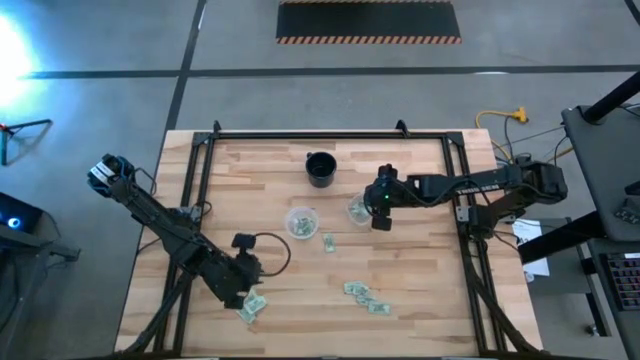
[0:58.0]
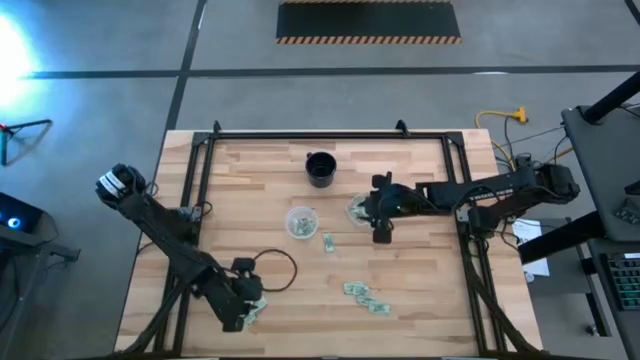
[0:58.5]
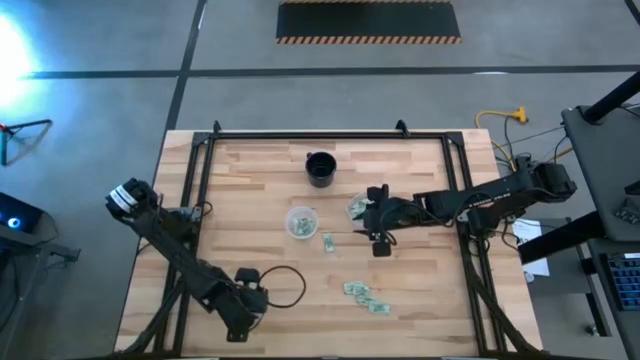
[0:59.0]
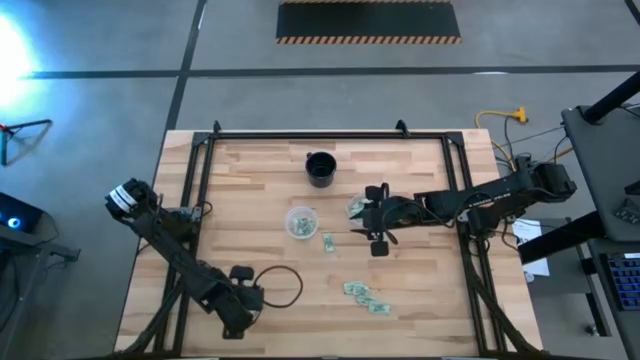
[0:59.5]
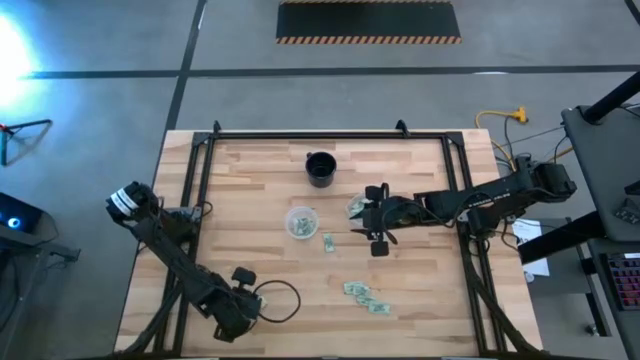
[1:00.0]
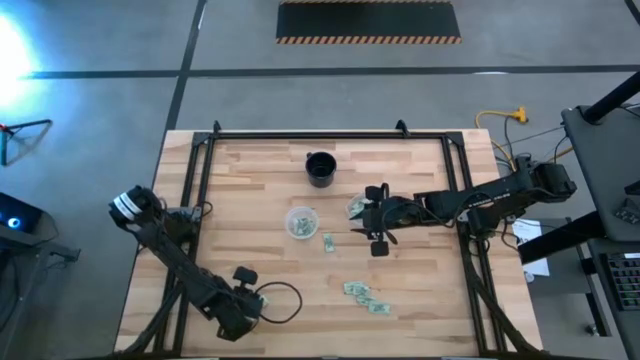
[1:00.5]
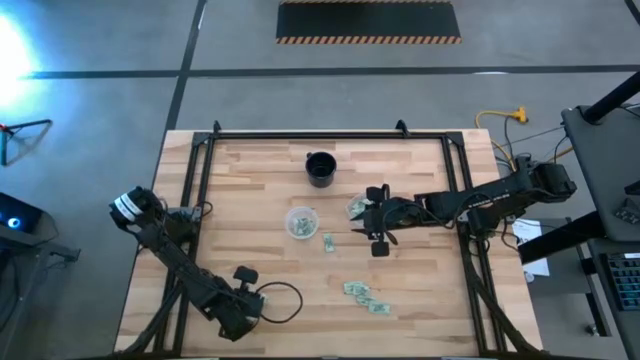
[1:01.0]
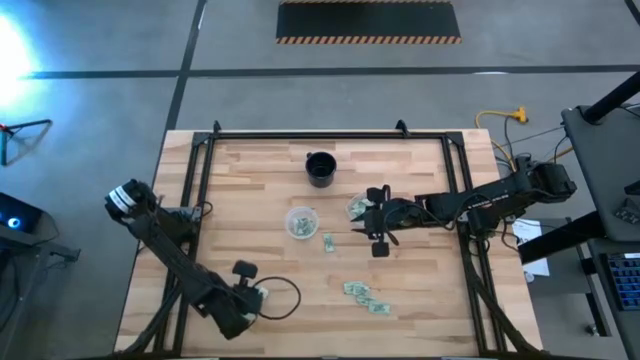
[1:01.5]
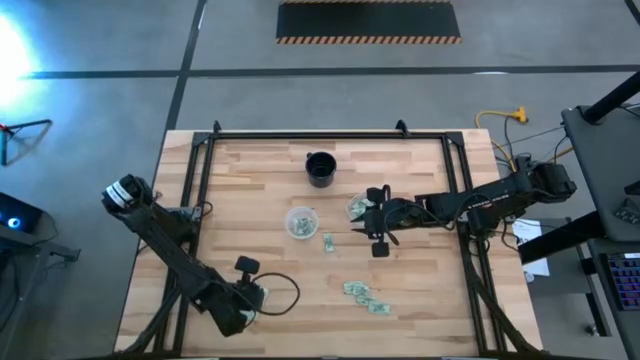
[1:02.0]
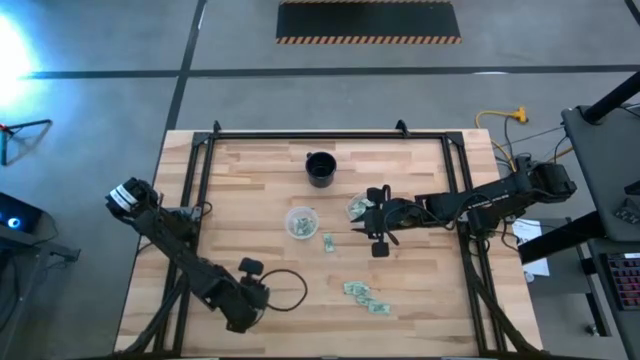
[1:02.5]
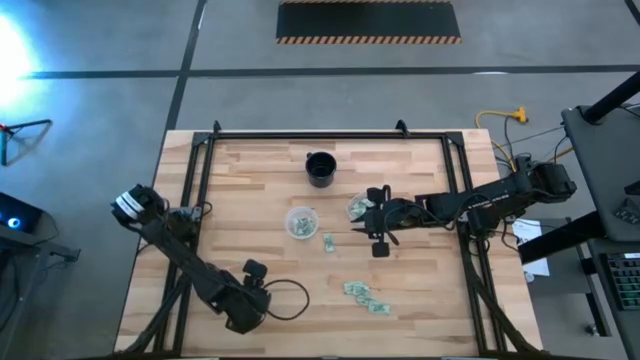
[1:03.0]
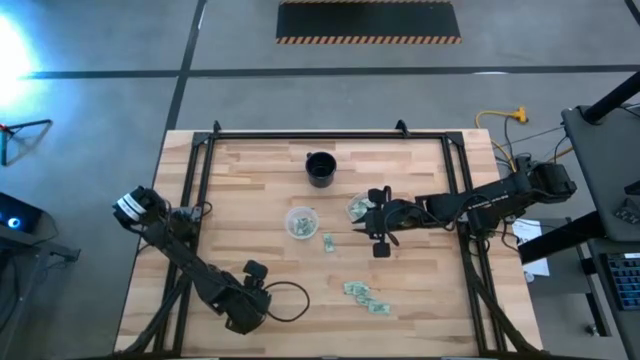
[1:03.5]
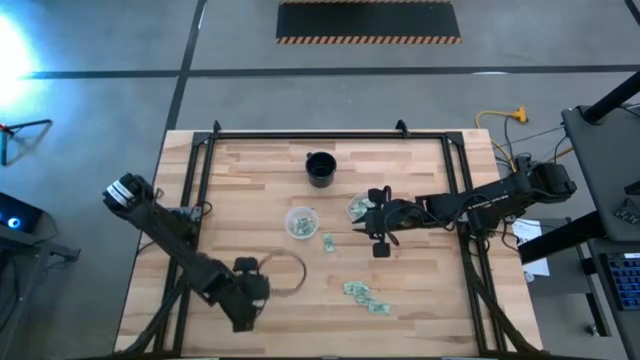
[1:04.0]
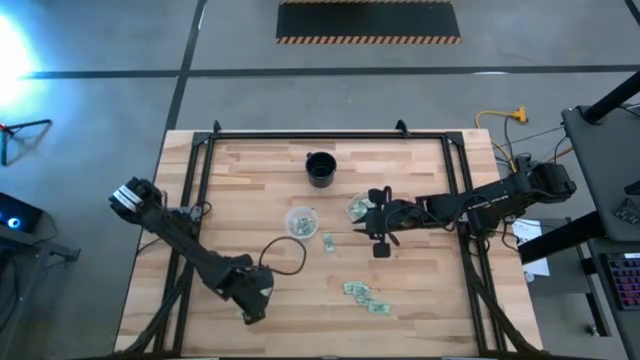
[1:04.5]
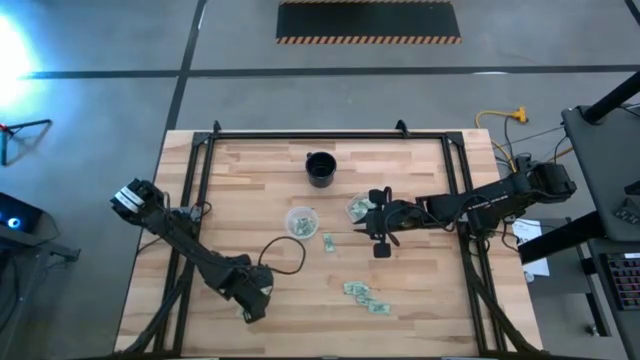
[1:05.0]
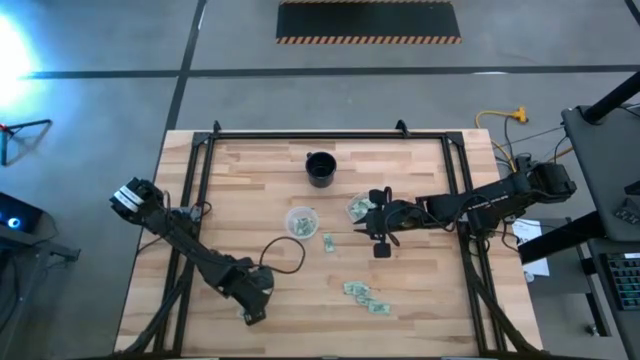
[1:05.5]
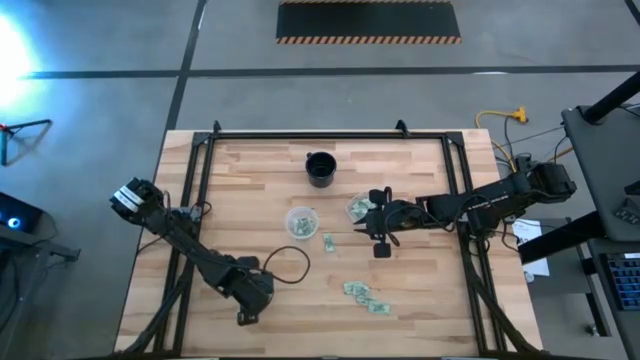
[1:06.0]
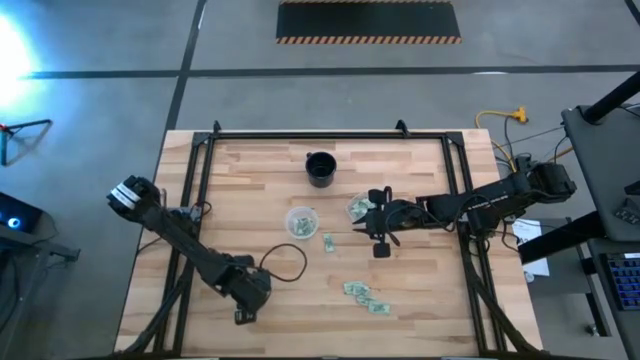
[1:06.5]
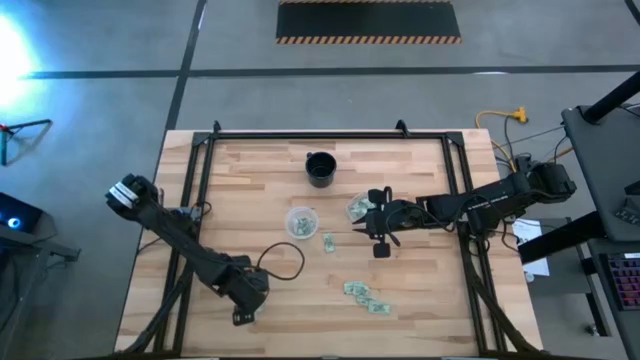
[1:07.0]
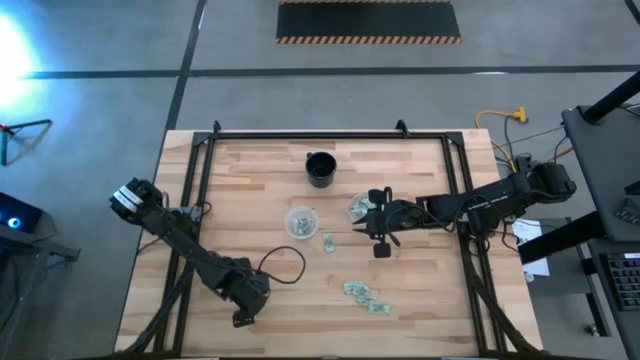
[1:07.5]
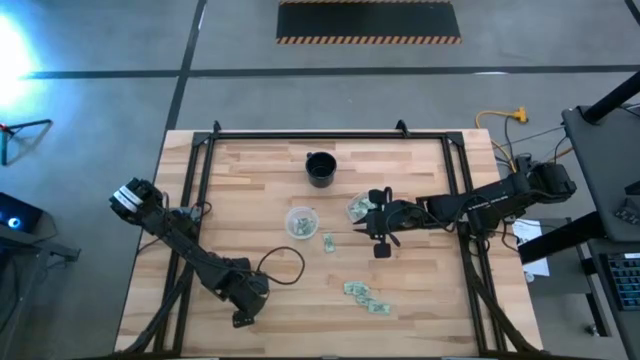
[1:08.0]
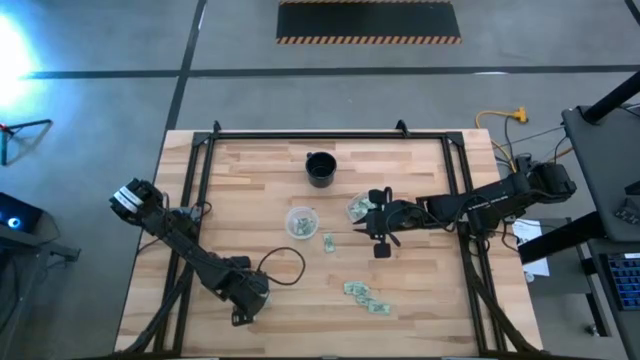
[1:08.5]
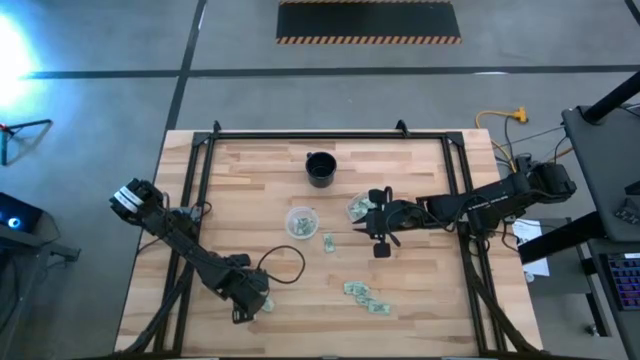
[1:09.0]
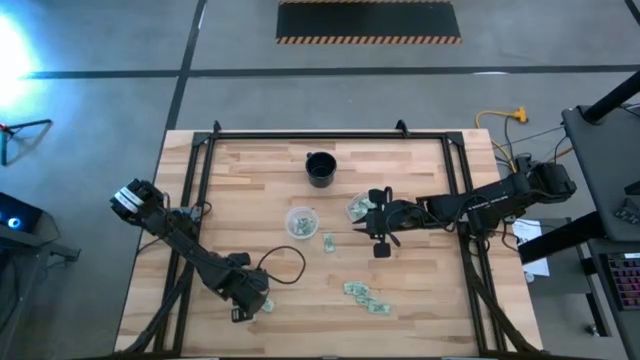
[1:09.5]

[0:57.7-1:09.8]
Task: Pick and place Stevia / Truvia into bins
Put the green stevia packet into the left transparent container

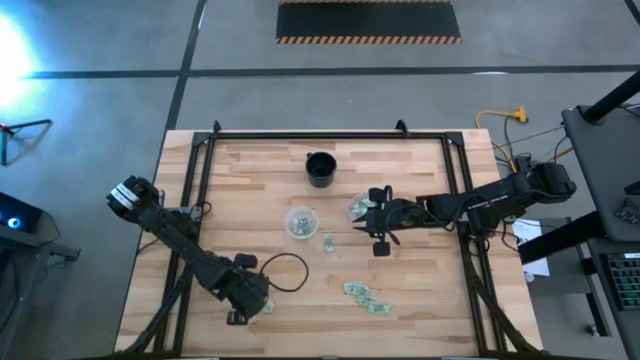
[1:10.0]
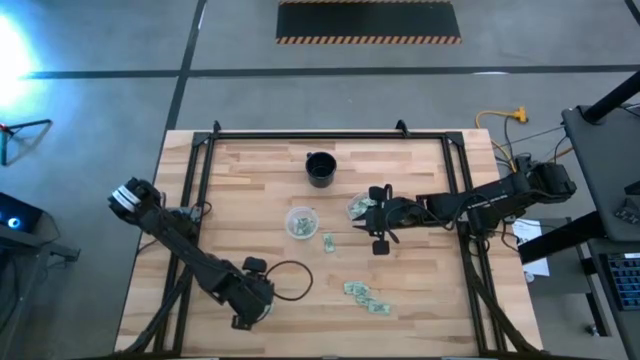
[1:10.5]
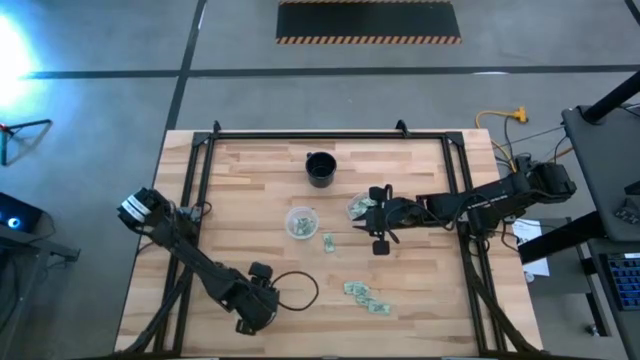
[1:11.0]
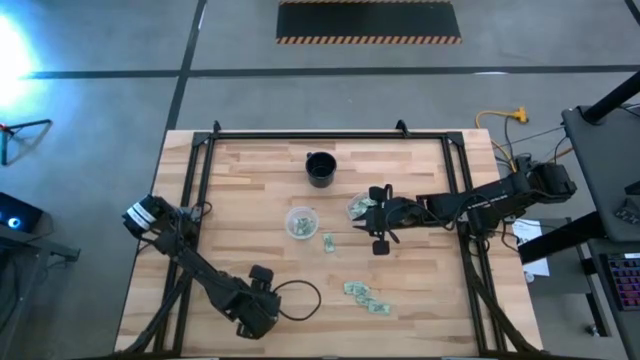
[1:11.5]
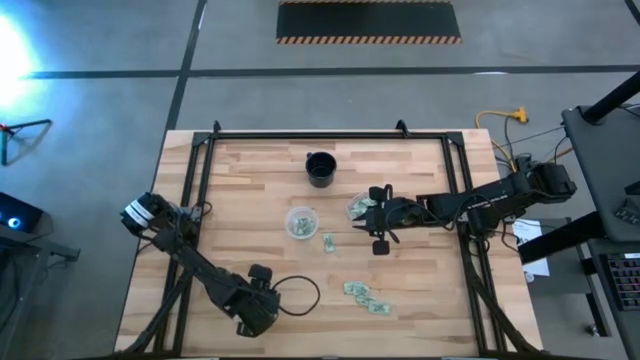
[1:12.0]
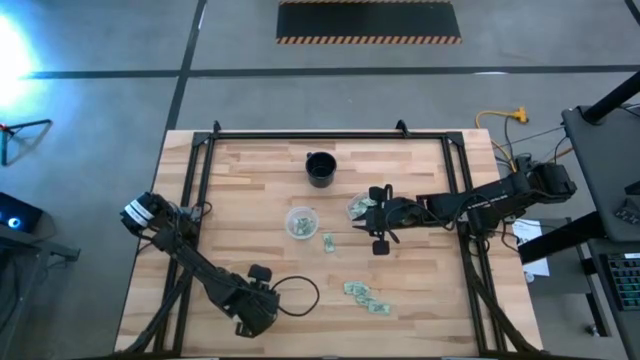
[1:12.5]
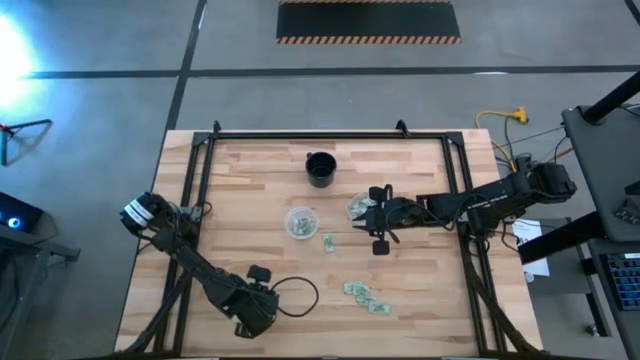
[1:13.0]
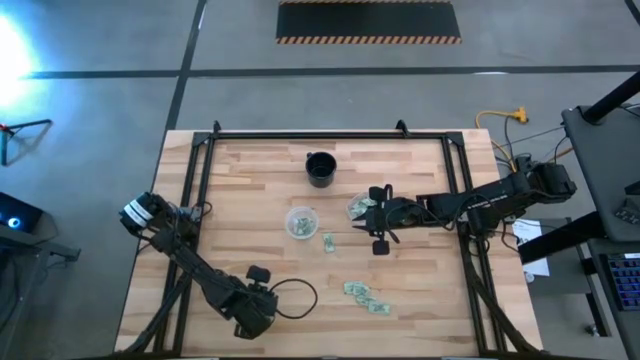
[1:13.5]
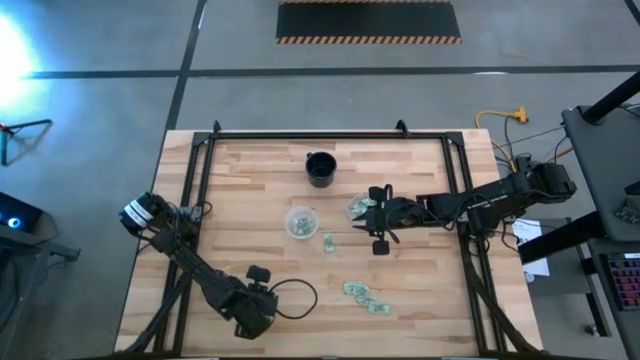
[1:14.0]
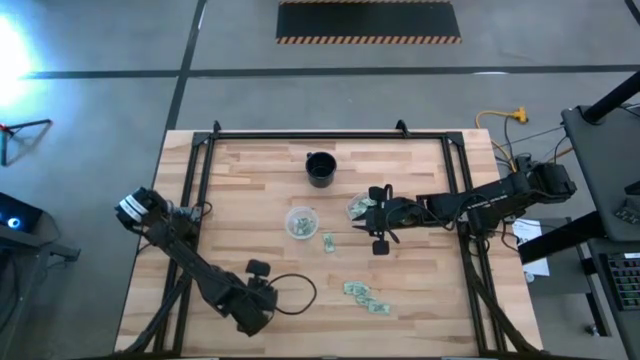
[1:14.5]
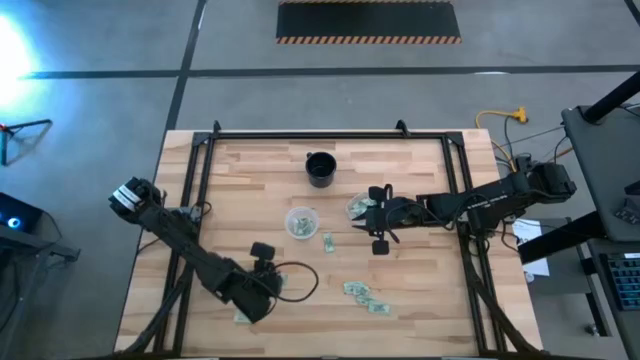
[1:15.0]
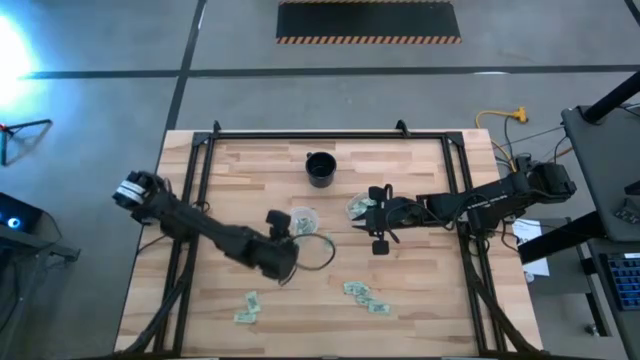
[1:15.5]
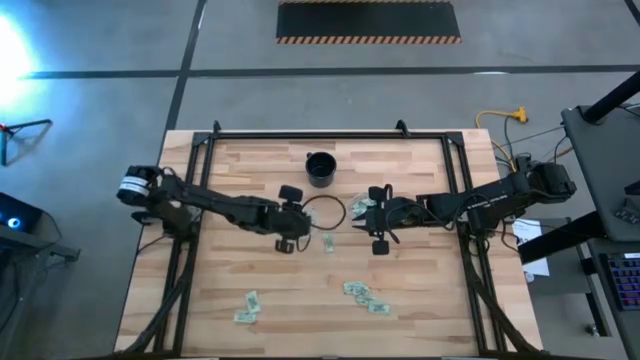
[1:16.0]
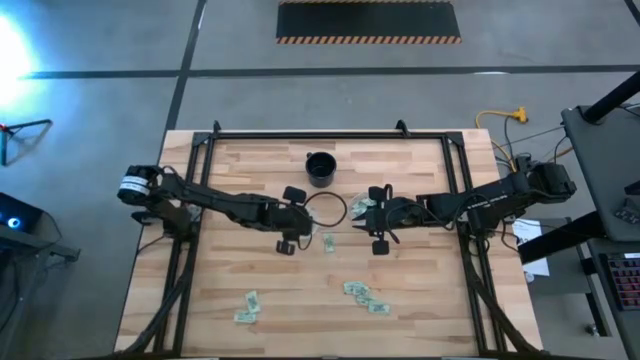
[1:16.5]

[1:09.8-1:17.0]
Put the green stevia packet into the left transparent container

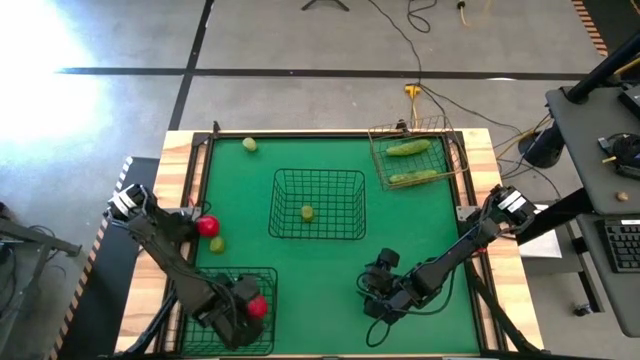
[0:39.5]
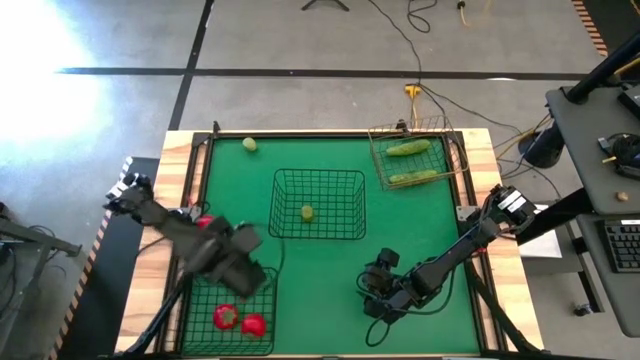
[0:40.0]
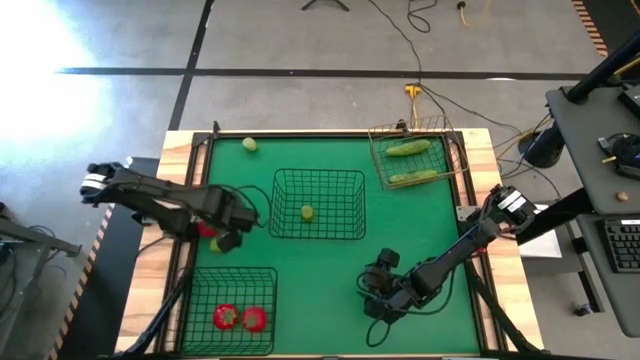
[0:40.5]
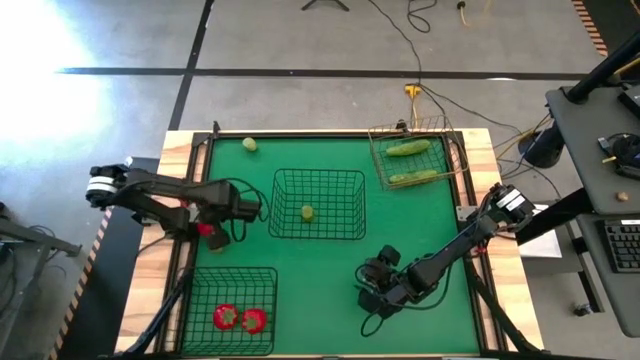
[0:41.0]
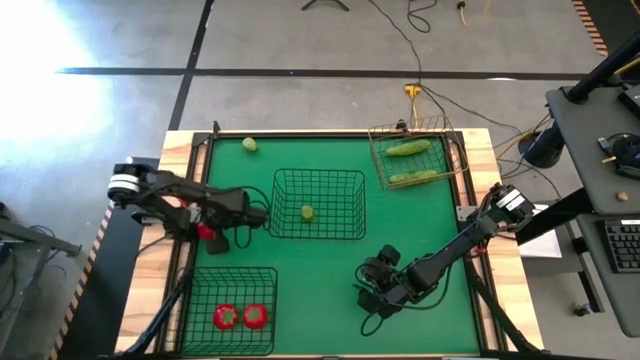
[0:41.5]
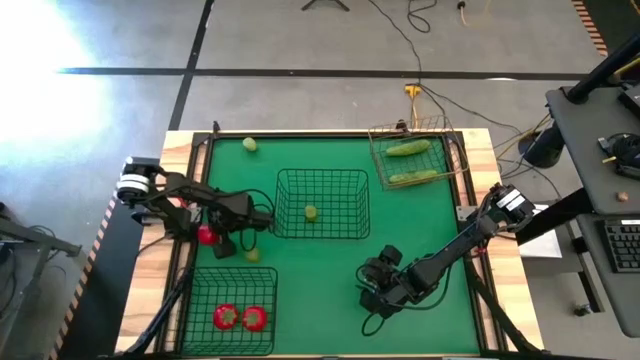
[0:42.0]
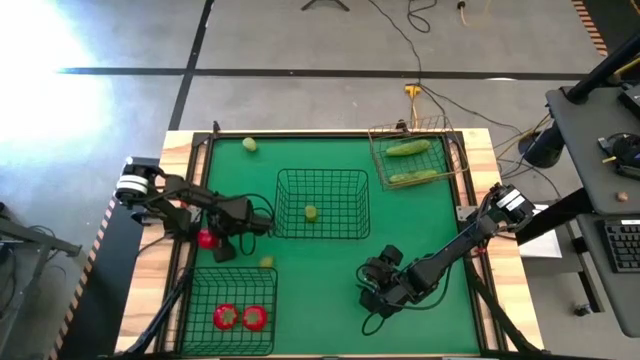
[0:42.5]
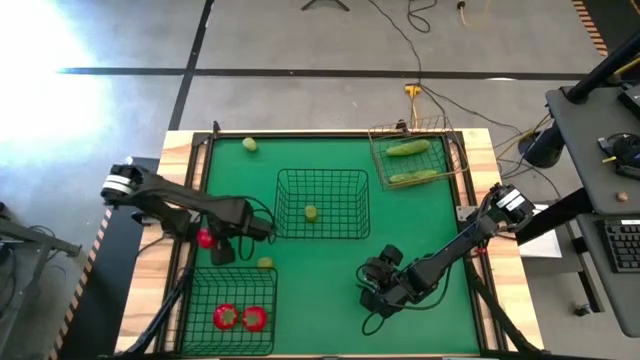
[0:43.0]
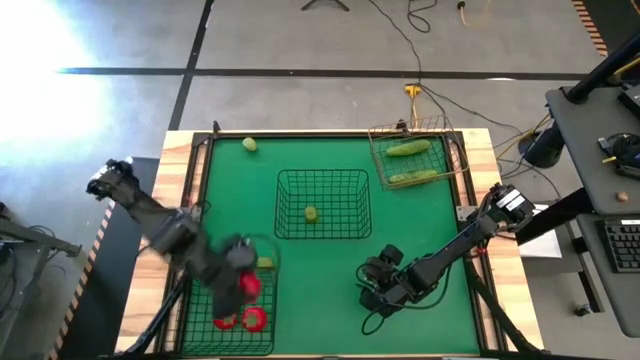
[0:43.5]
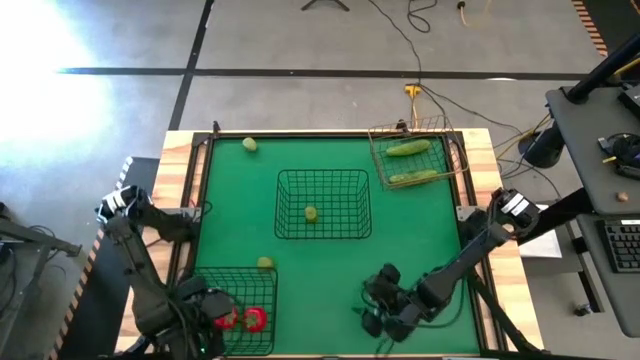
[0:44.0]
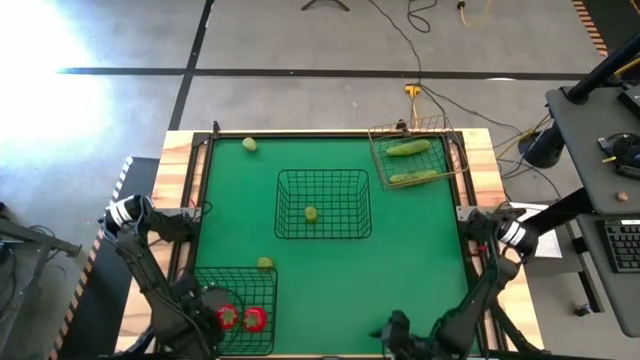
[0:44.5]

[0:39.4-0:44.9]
Task: Sort produce into baskets
Put the red tomato into the bottom black wire basket
